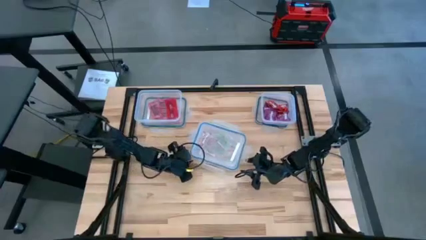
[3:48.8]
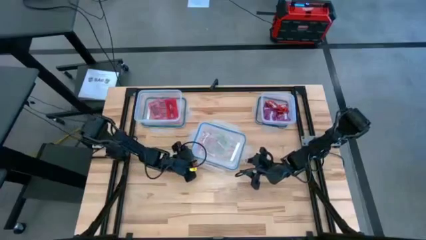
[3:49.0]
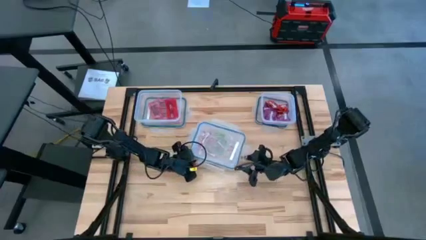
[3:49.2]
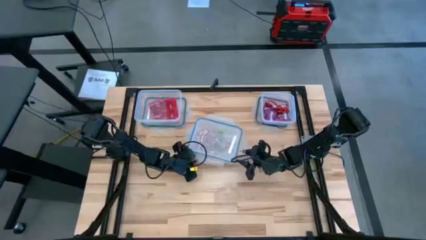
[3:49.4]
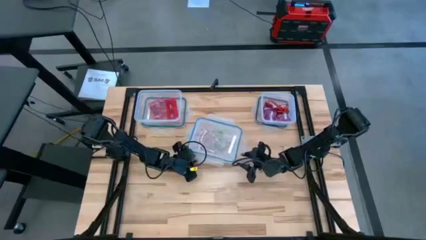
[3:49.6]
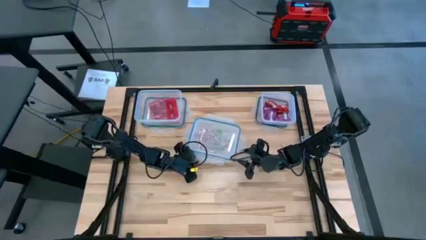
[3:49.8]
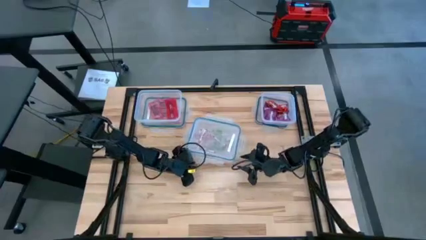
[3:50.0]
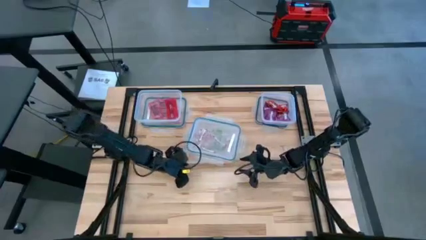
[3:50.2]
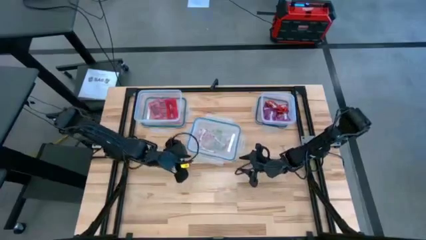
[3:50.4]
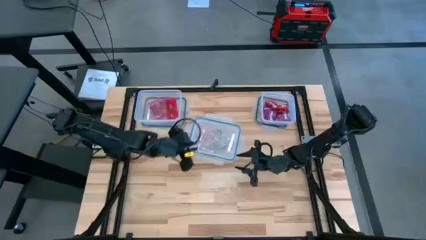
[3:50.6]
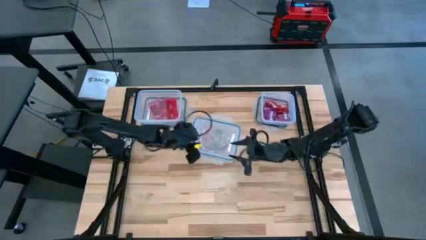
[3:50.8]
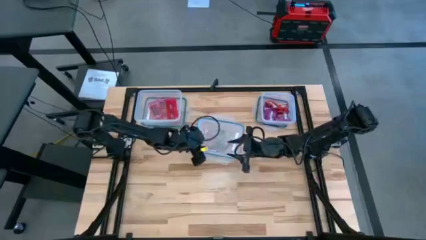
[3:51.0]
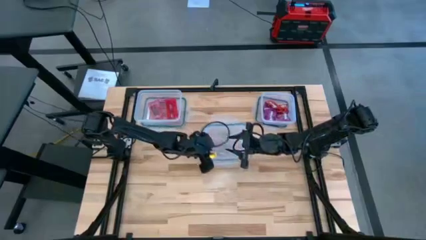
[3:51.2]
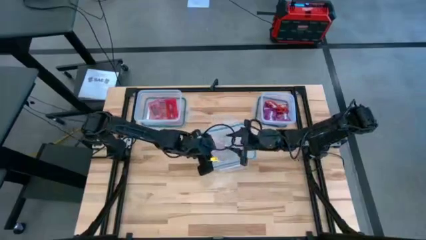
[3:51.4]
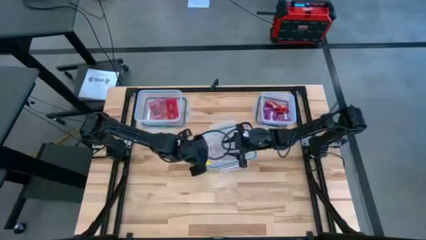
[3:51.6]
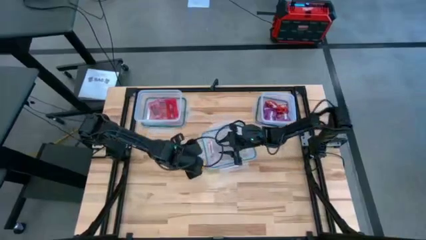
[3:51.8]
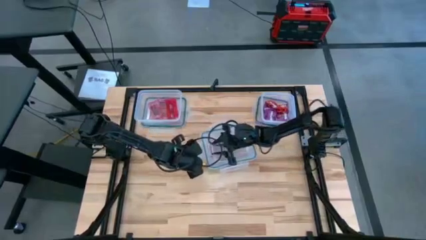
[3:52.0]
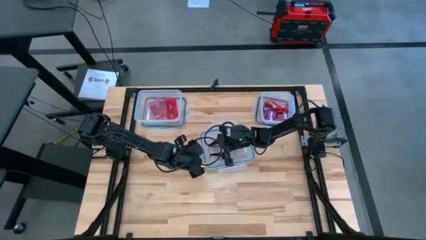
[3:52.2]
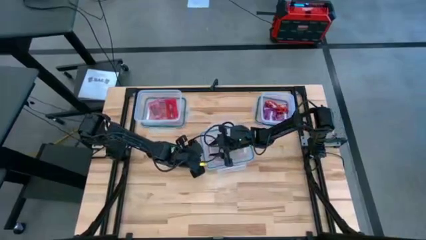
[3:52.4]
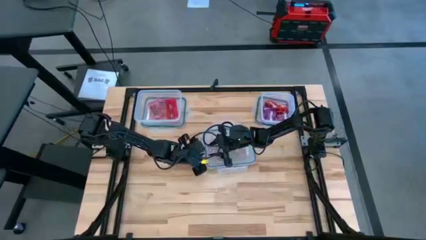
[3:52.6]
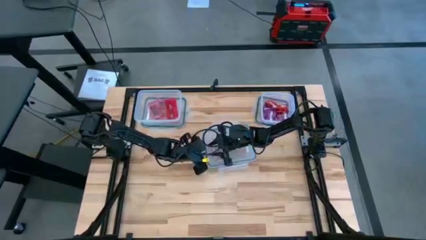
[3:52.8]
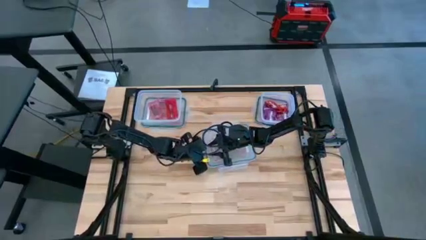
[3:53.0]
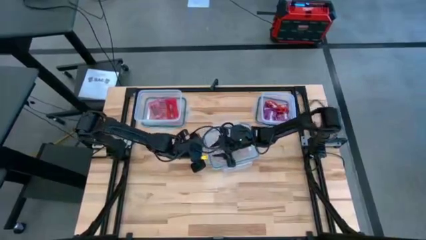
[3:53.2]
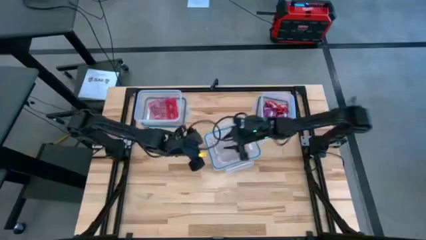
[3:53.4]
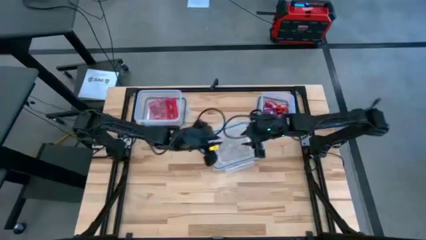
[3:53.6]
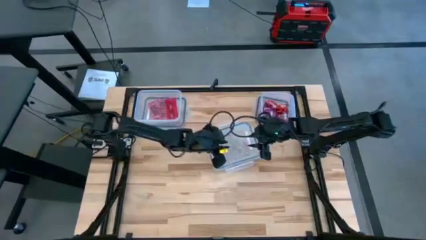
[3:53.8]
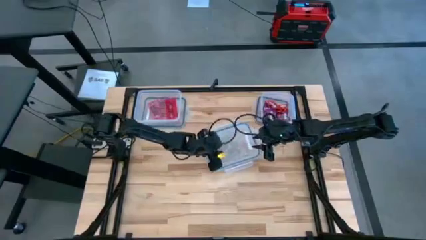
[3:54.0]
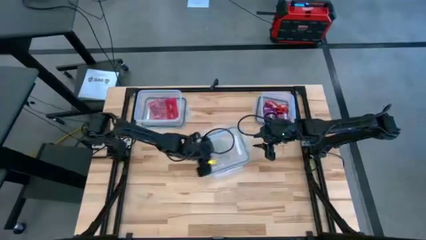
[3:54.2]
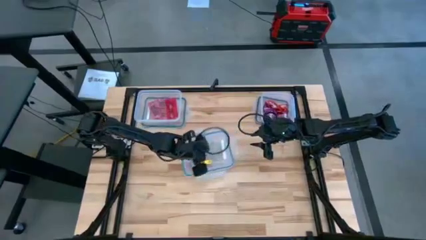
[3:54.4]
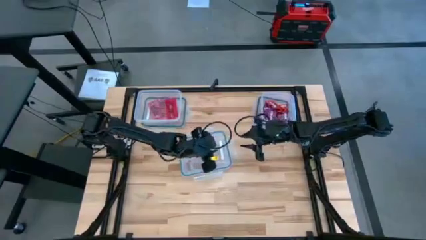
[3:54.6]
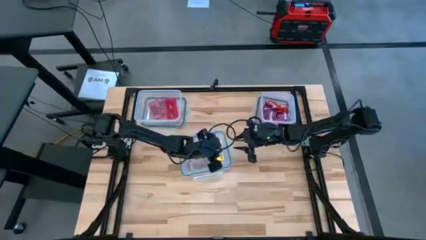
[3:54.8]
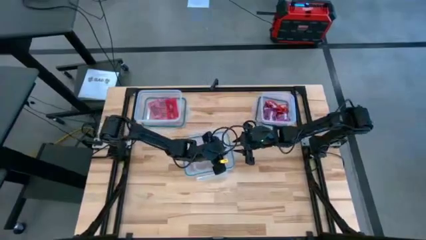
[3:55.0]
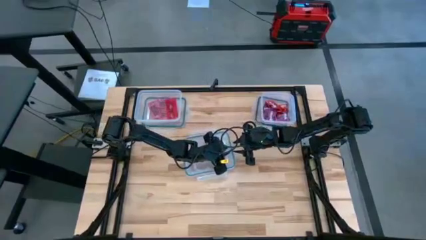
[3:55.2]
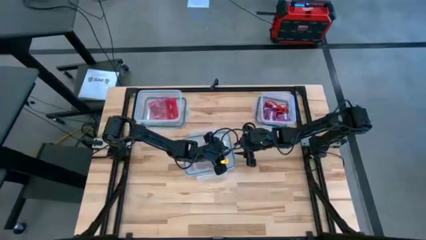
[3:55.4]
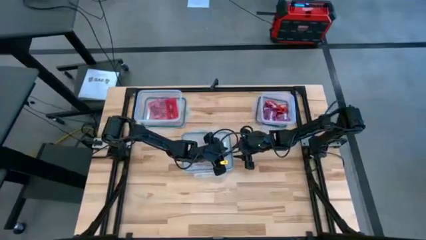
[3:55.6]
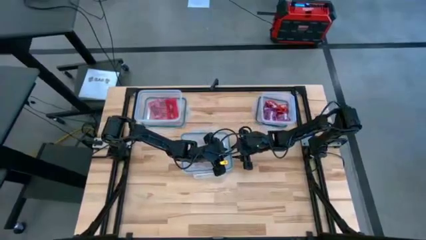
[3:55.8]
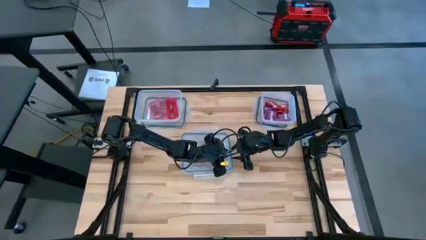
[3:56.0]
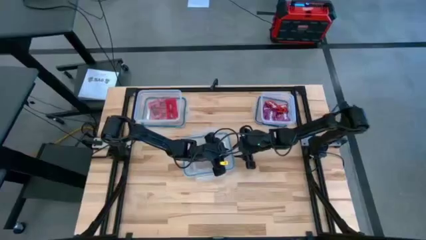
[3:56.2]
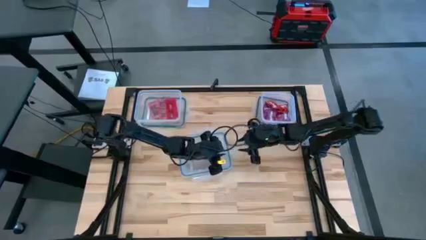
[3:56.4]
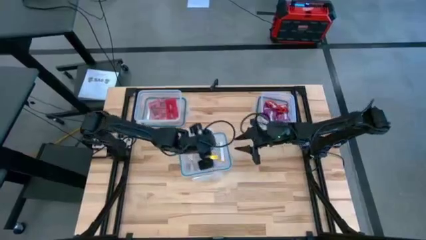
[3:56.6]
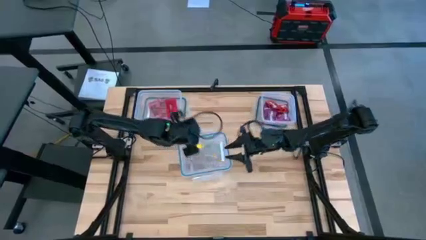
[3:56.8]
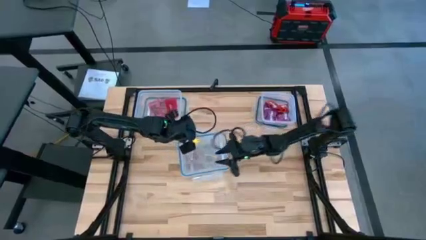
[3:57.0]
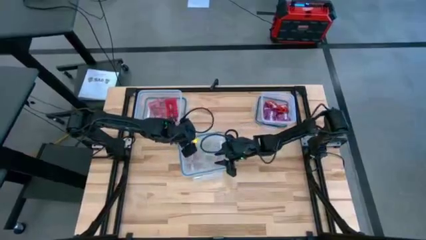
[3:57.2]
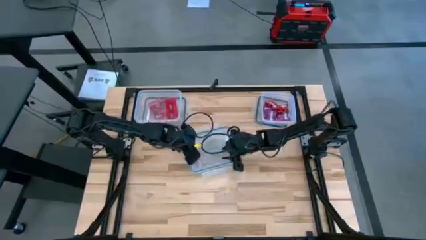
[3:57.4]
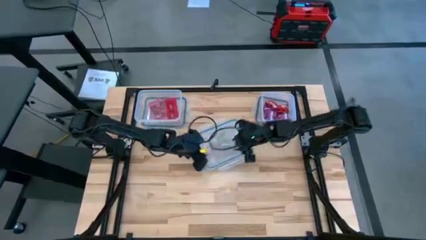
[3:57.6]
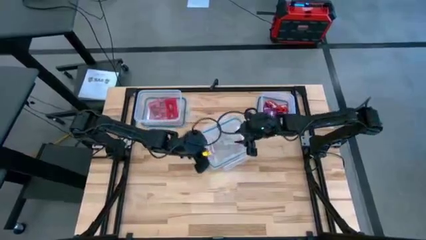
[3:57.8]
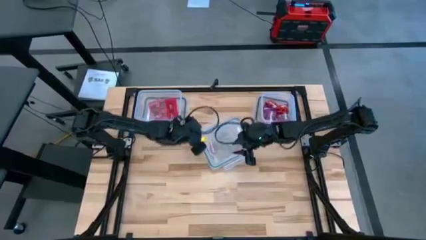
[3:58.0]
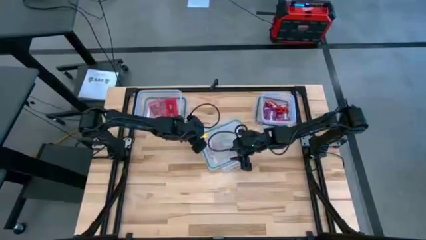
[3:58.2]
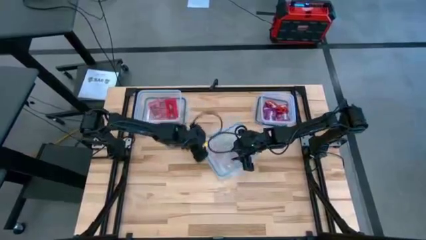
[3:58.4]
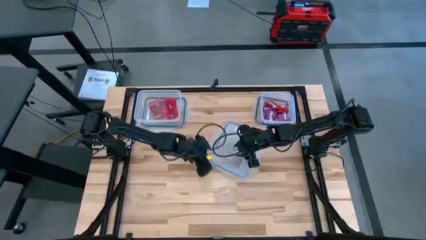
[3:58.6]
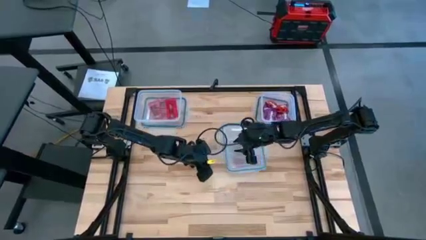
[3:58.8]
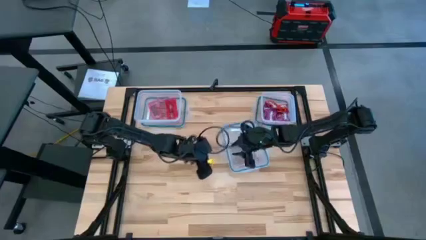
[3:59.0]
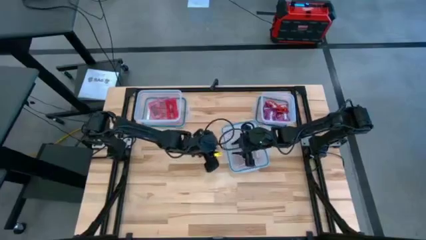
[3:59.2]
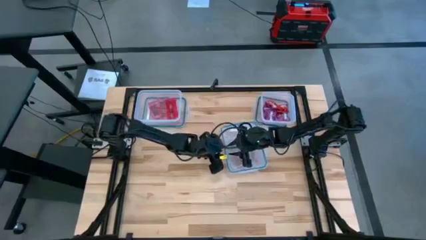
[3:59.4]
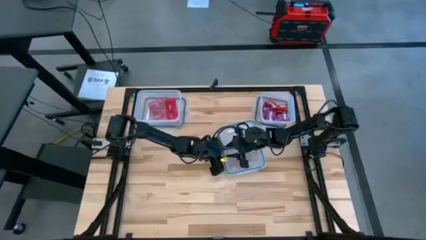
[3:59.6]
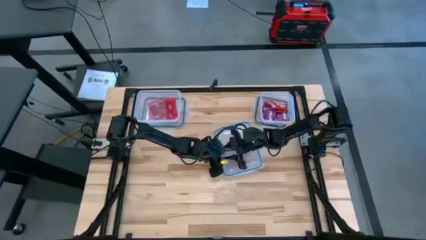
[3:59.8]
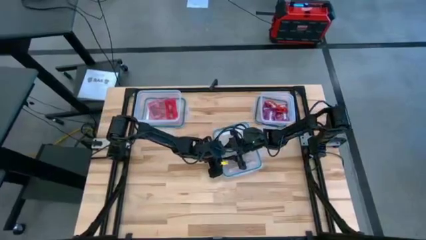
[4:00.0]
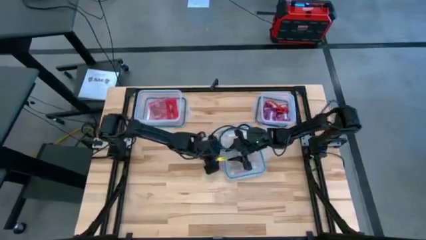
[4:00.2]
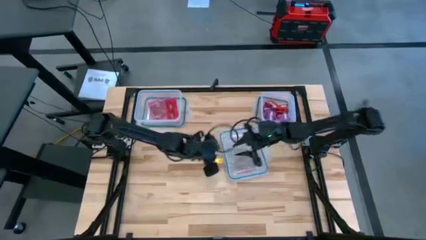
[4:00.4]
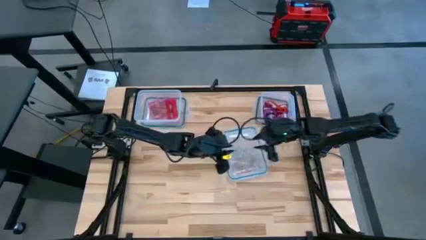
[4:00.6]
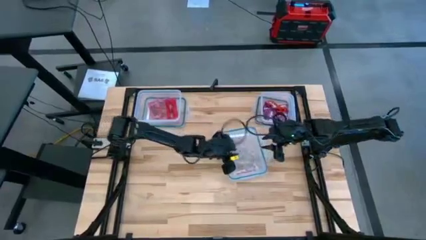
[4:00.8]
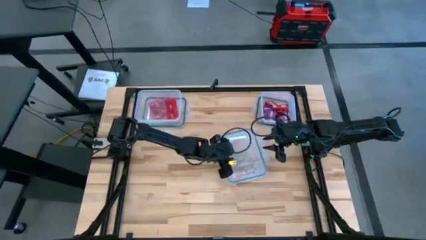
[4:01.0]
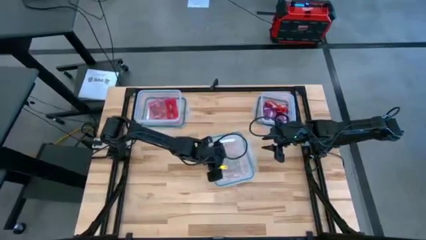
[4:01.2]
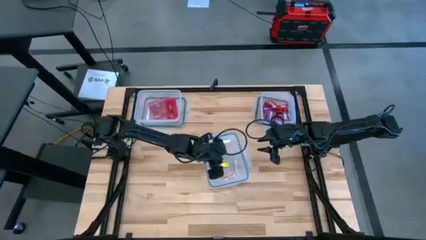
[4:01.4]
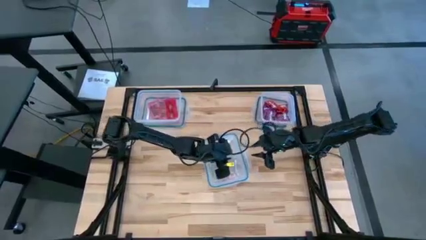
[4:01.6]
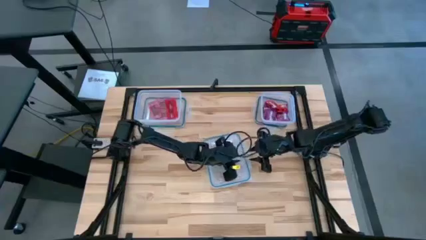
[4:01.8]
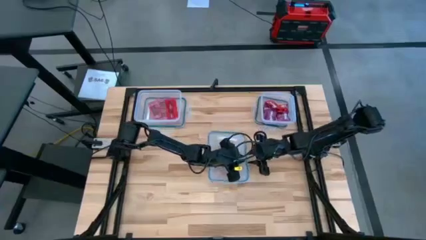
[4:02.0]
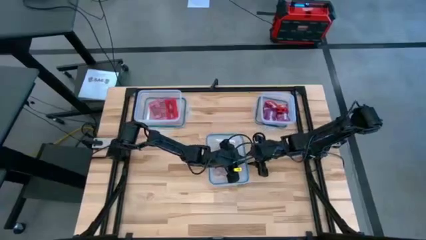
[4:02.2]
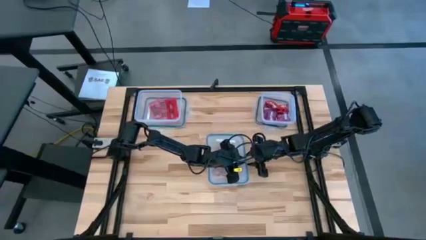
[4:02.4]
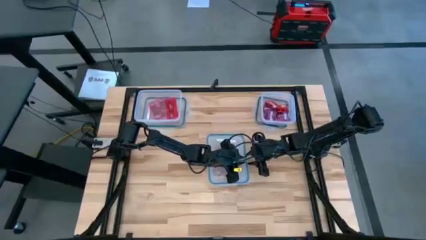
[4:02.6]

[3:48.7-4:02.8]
Task: Sort candy
Close the center transparent bin

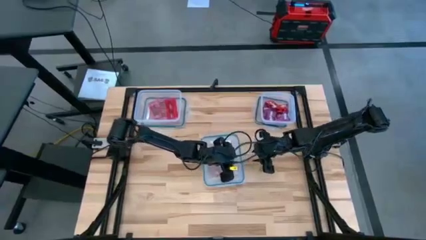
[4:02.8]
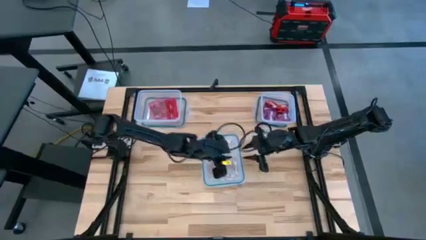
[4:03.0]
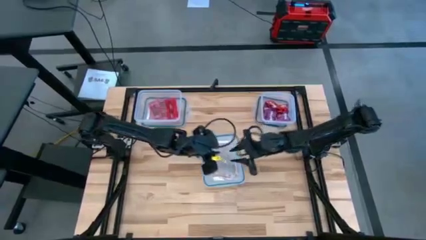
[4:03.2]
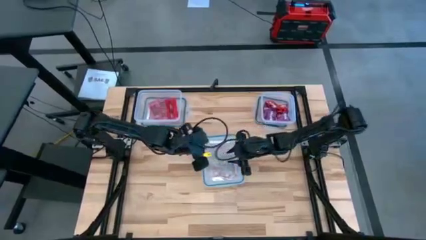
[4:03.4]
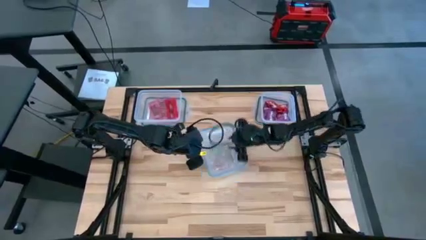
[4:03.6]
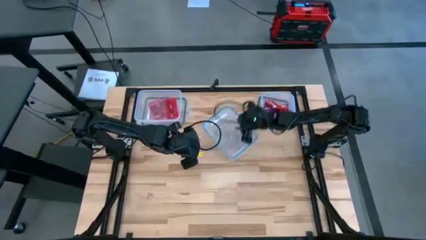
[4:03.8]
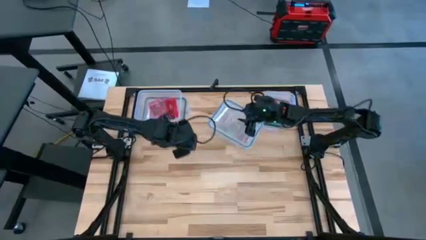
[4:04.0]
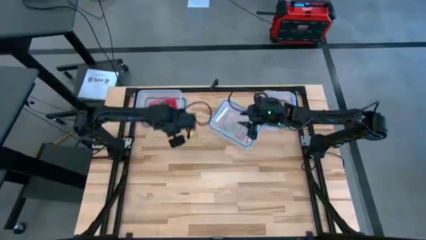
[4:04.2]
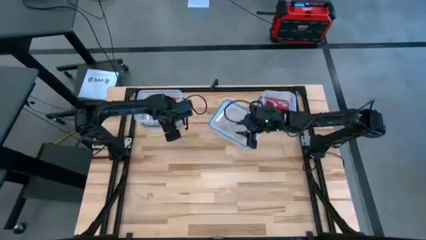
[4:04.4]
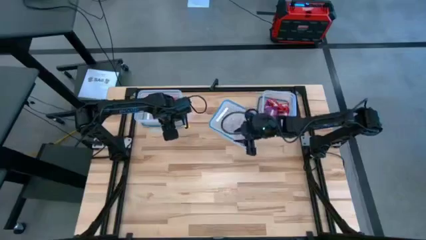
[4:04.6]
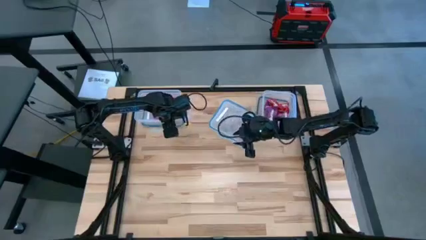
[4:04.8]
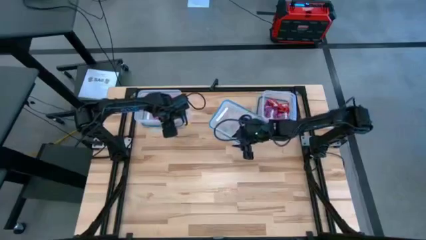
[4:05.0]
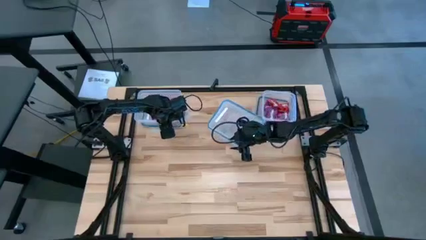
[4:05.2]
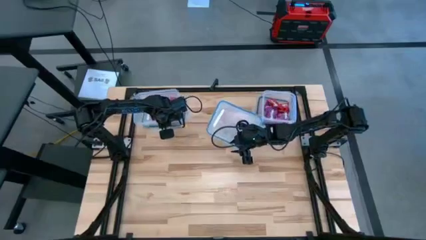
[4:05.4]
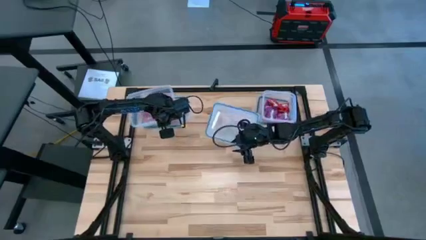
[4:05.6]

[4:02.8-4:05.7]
Move the center transparent bin to the top center
